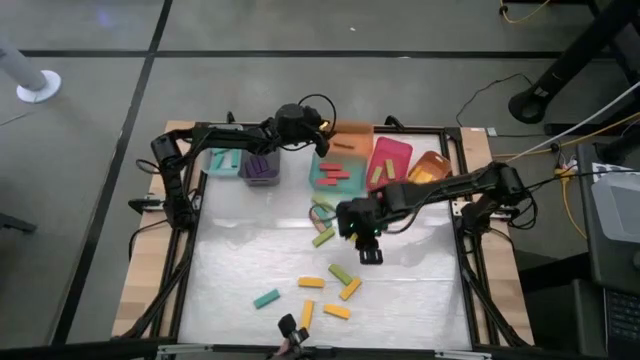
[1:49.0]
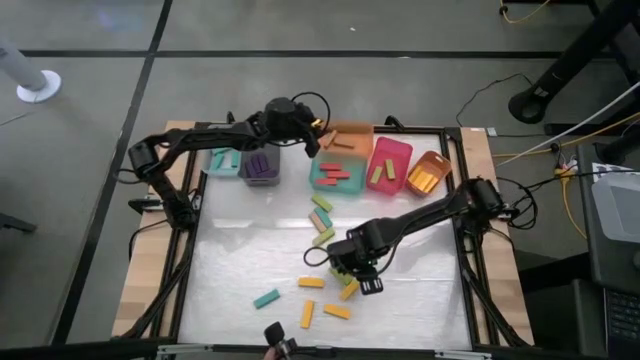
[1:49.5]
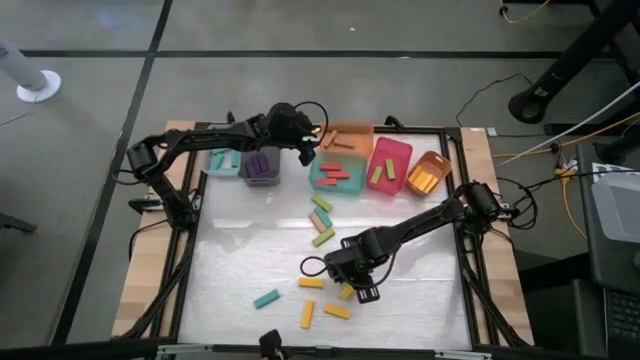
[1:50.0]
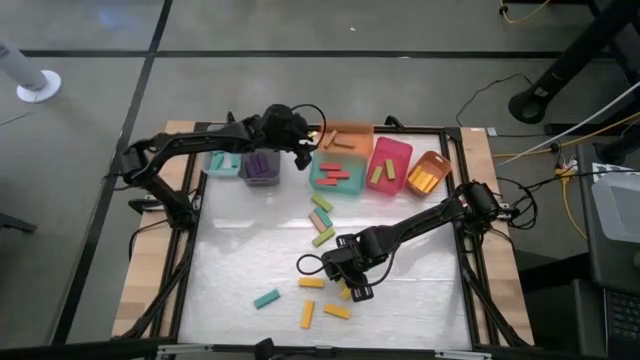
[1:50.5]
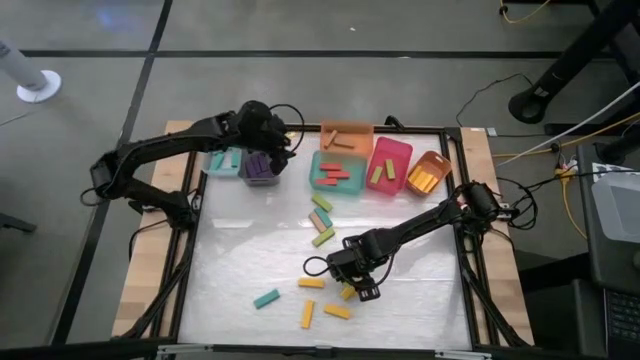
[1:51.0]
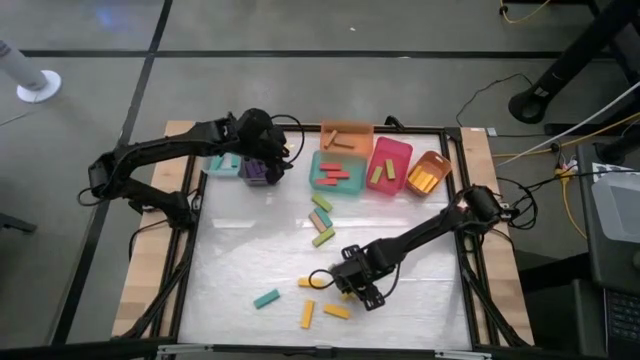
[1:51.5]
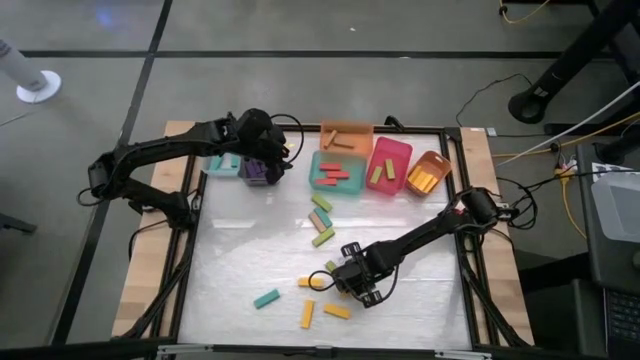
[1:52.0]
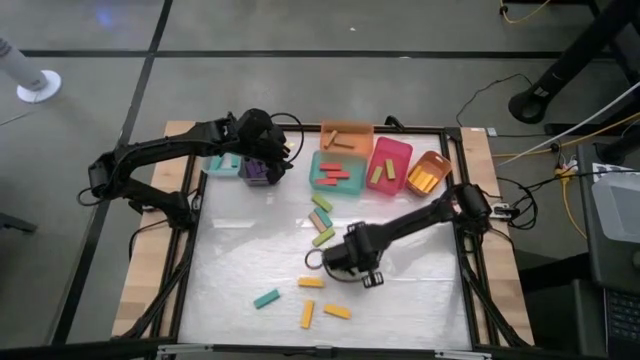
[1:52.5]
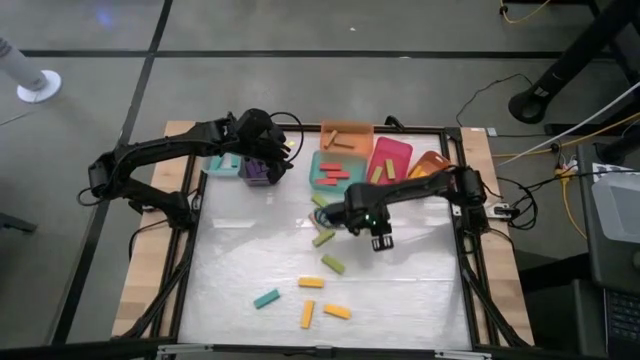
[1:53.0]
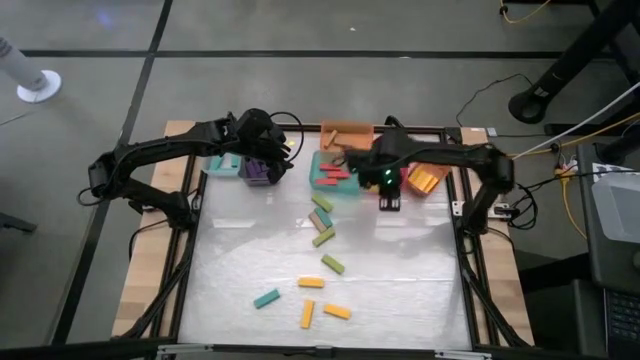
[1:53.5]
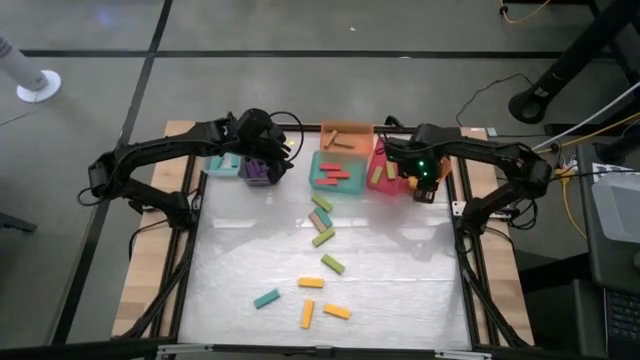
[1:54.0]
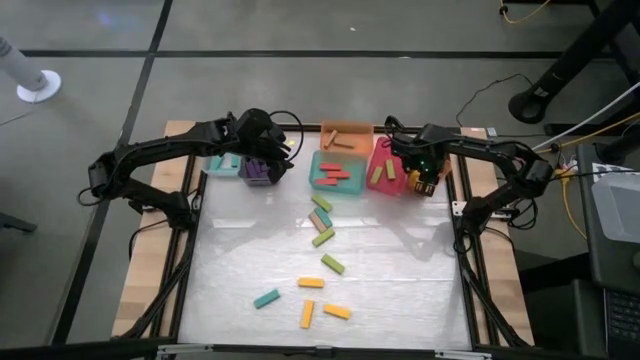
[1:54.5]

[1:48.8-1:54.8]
Task: Sort blocks
Put the yellow block into the right orange bin

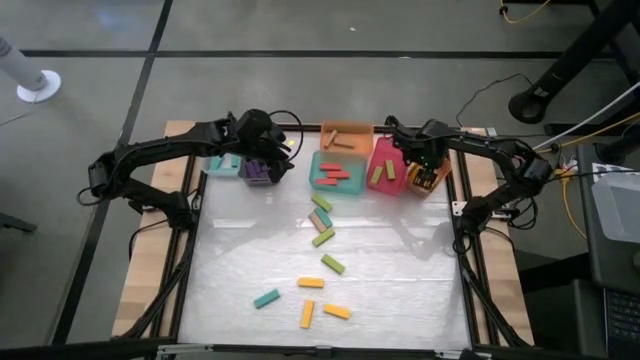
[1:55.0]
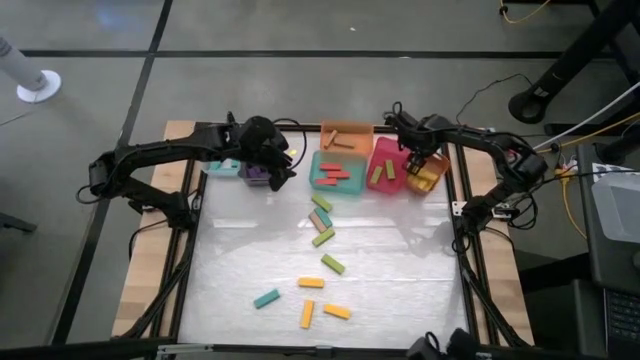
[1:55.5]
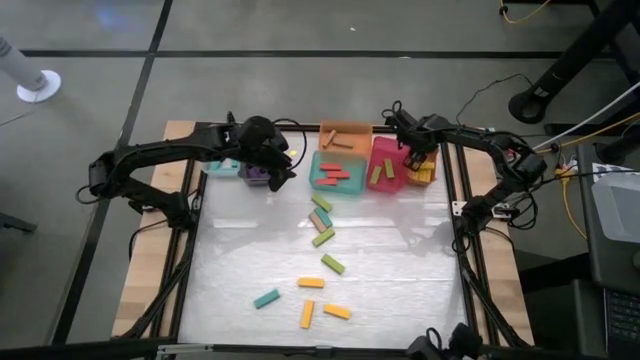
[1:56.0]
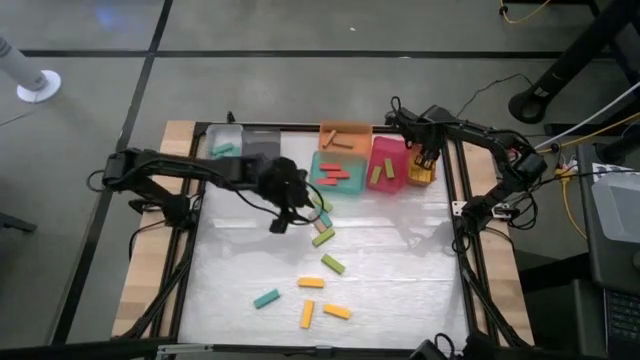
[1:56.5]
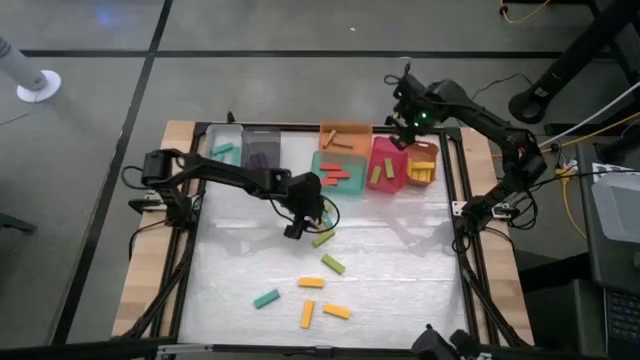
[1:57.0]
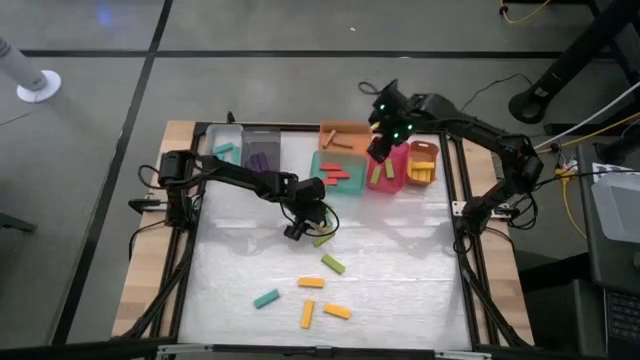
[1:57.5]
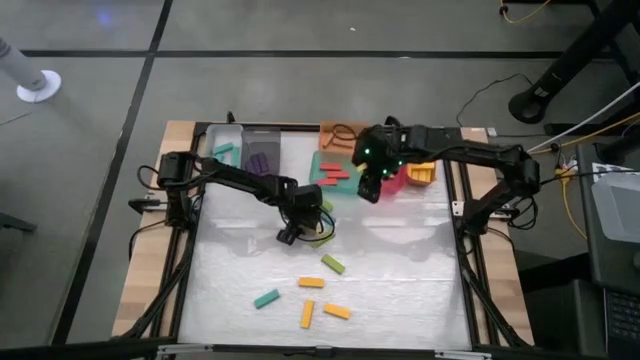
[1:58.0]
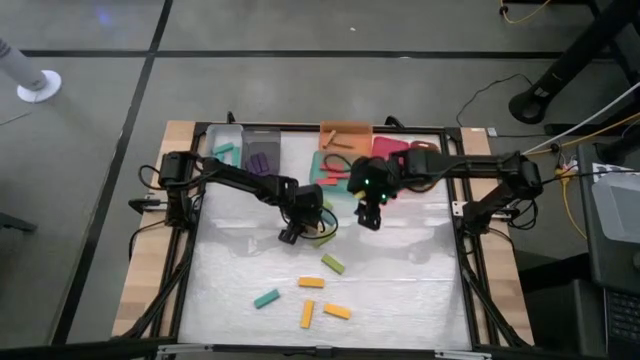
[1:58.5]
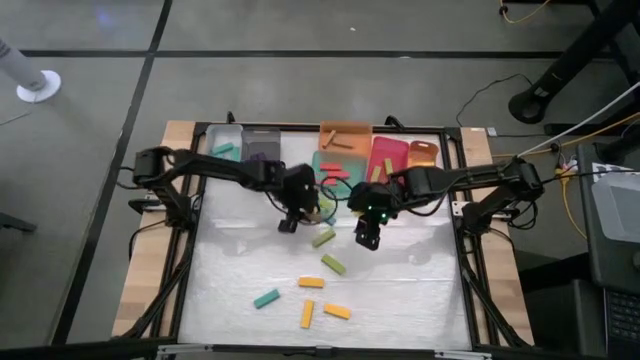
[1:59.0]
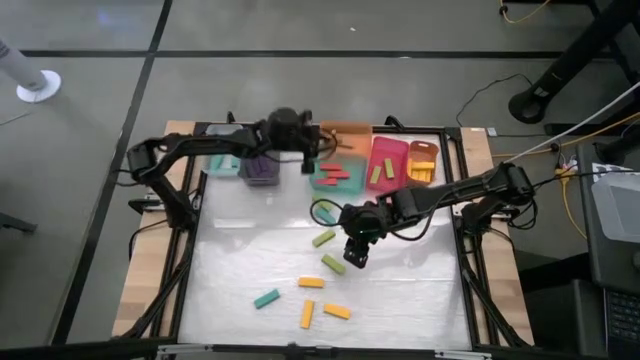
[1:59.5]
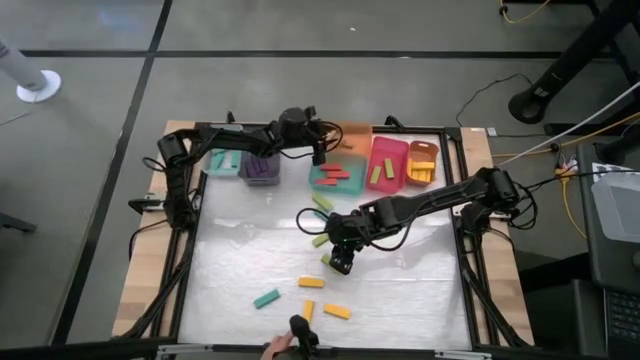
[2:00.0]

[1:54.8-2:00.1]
Put the brown block into the left orange bin

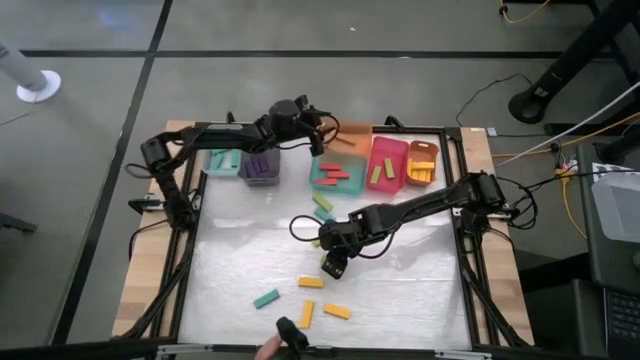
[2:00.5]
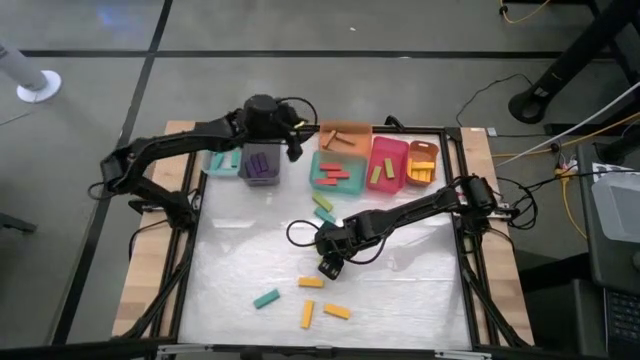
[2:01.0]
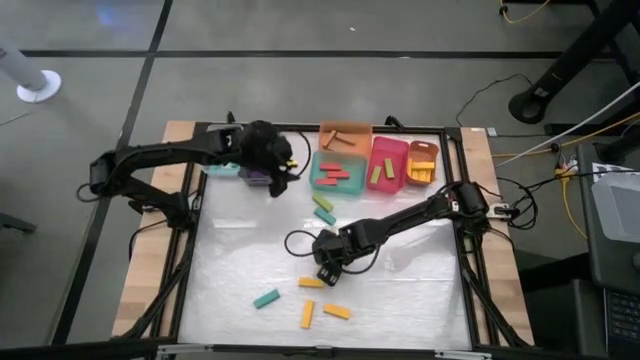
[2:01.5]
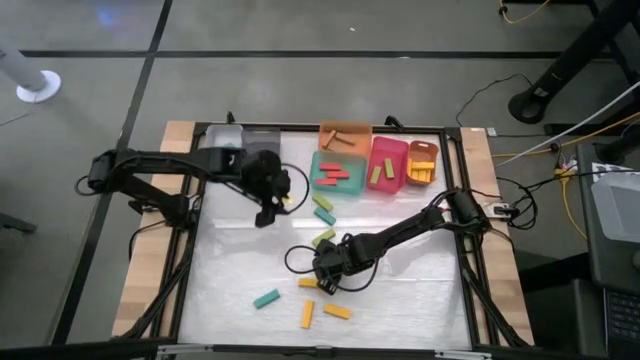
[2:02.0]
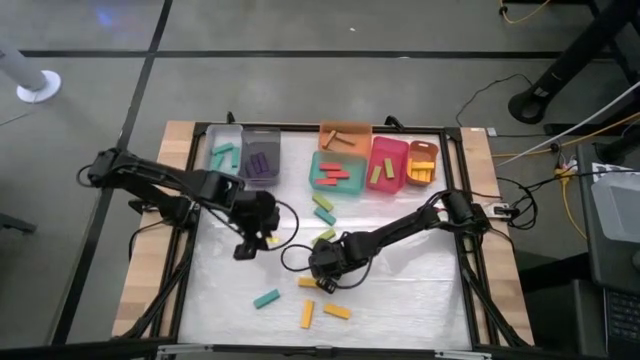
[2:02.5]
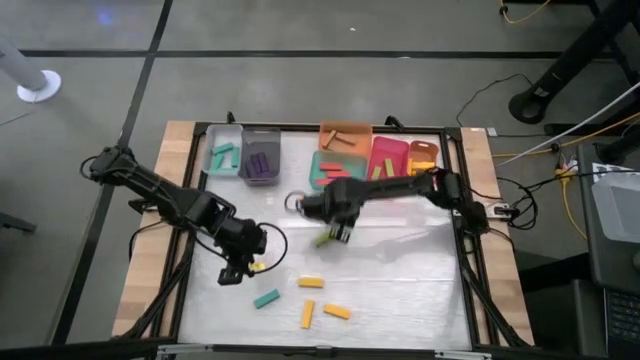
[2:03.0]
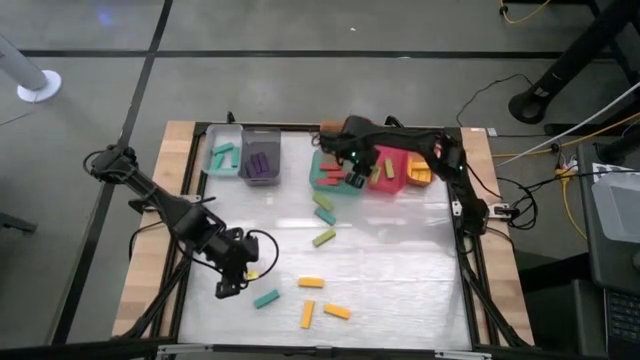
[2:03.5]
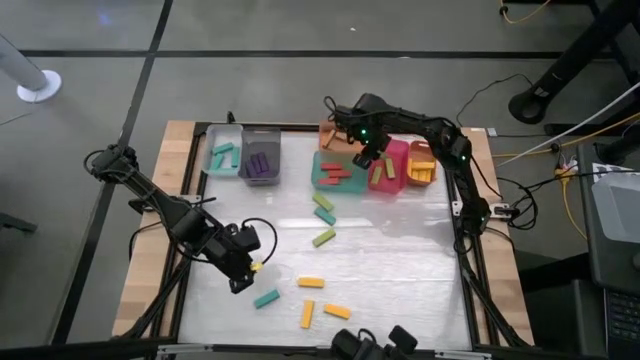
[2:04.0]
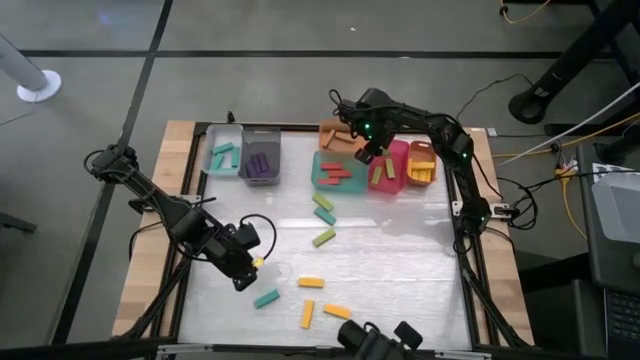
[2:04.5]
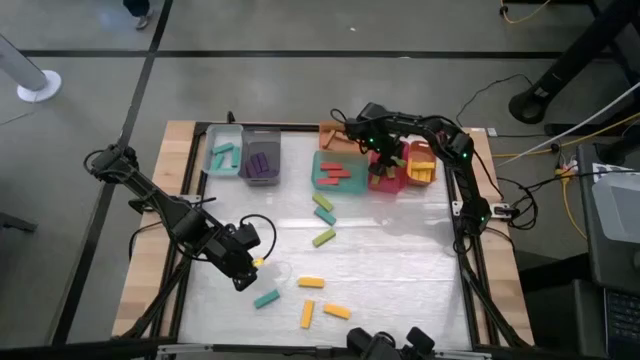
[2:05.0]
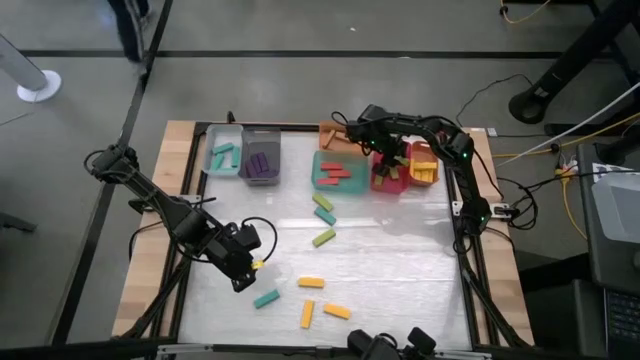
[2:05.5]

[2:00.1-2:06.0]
Put the light green block into the pink bin

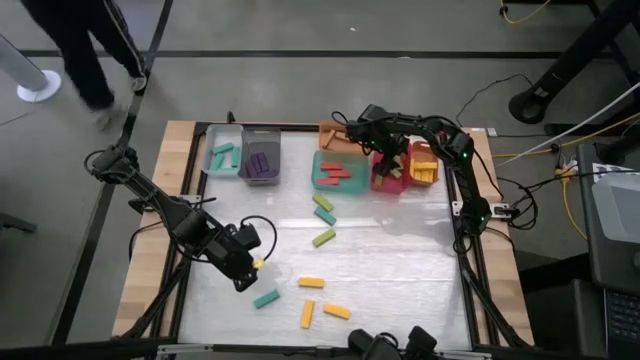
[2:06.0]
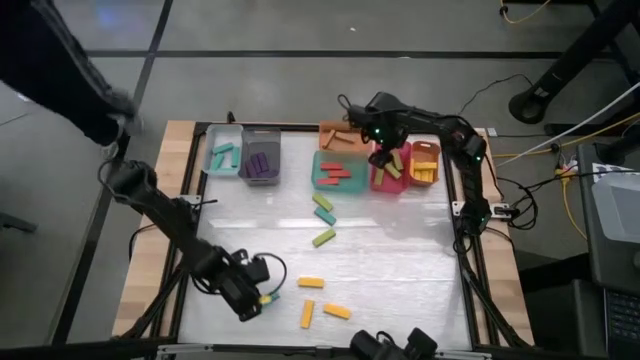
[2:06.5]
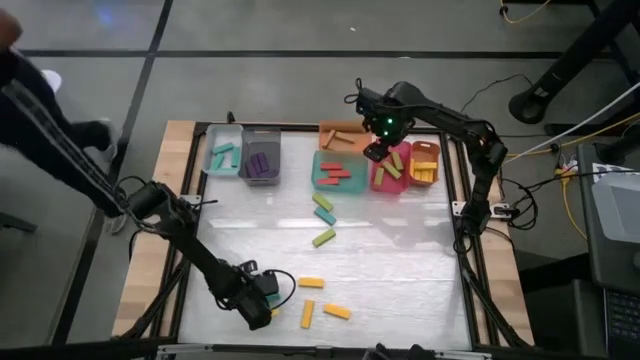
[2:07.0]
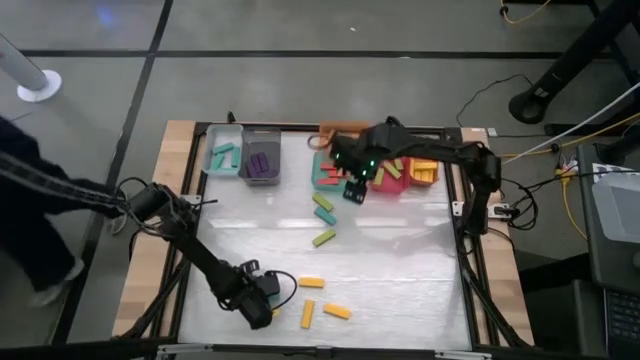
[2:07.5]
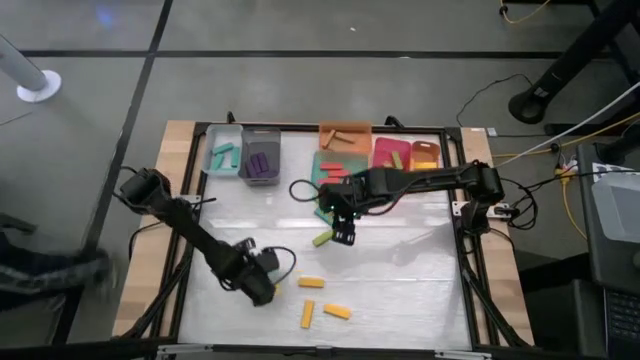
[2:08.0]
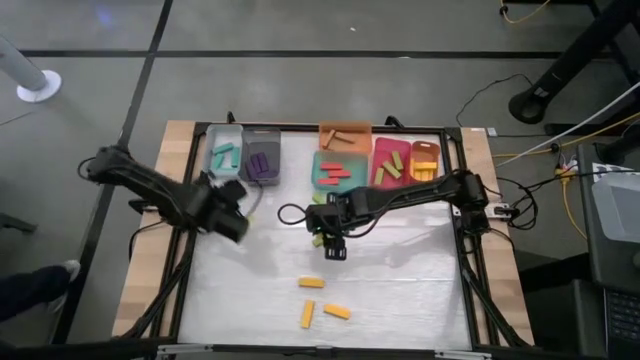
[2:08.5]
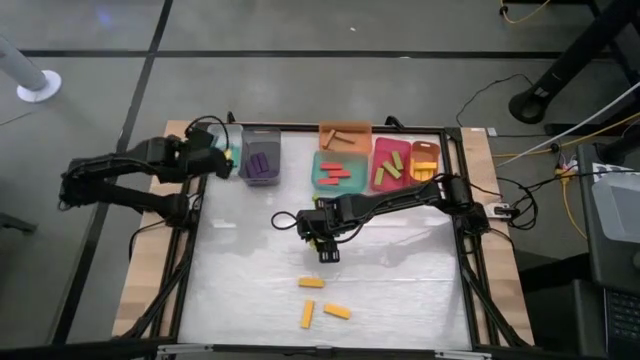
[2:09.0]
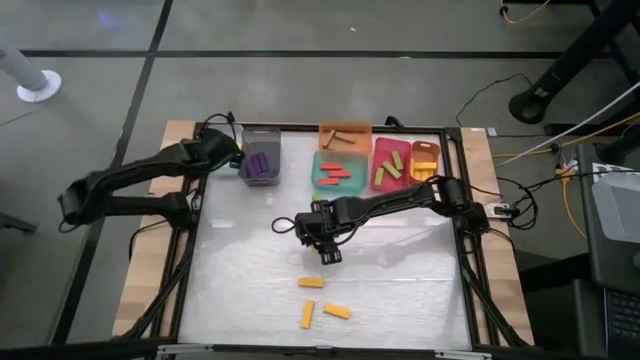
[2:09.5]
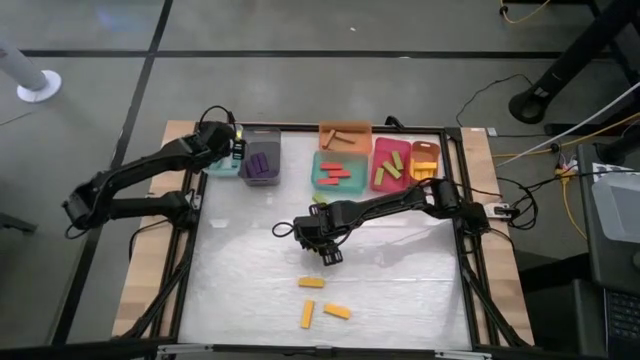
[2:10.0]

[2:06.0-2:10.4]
Put the light blue block into the transparent bin
